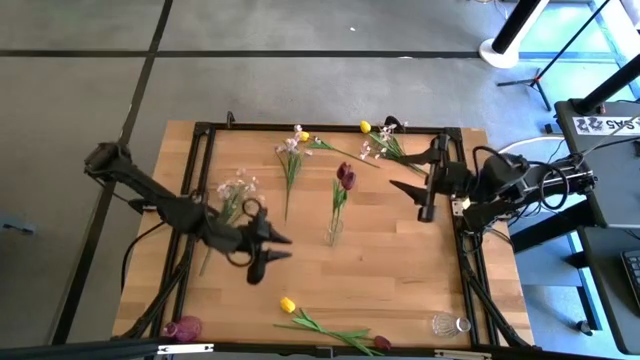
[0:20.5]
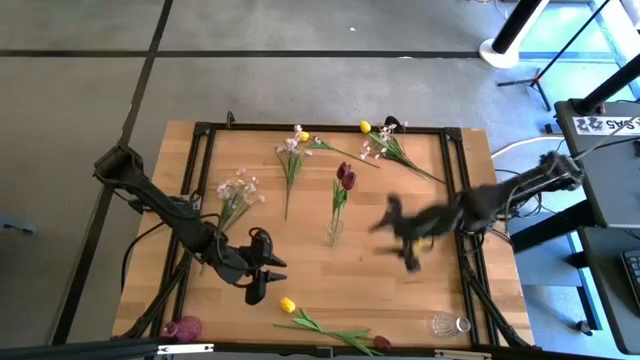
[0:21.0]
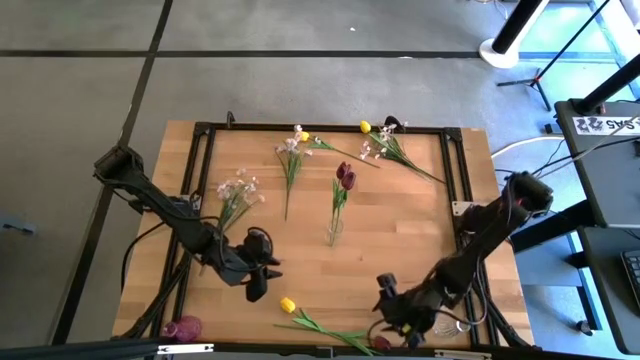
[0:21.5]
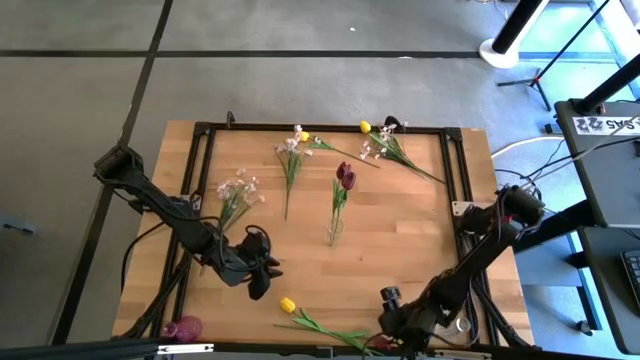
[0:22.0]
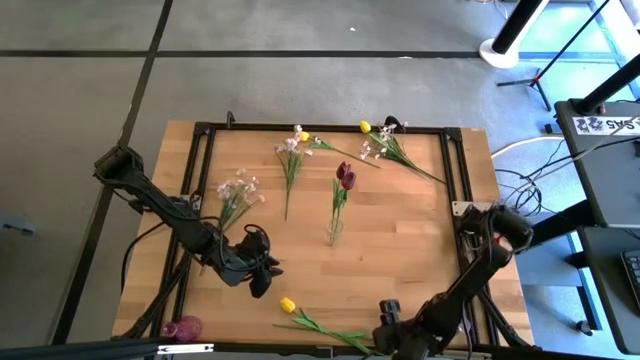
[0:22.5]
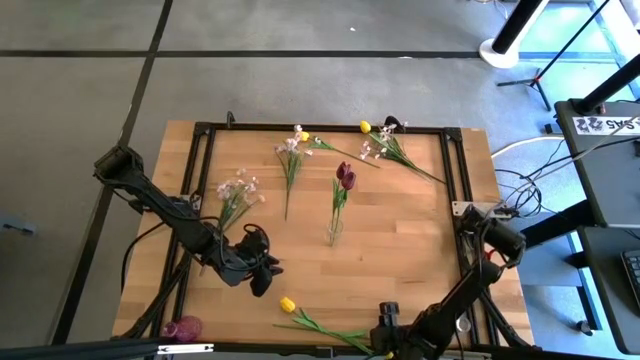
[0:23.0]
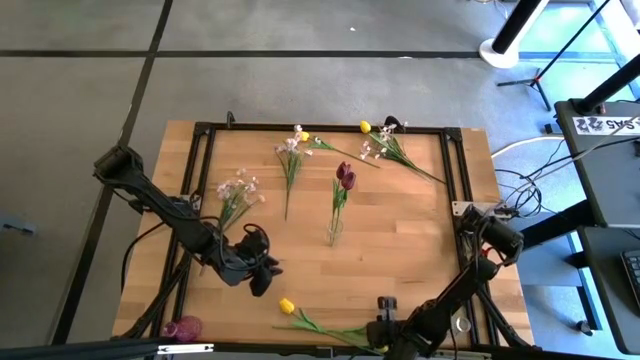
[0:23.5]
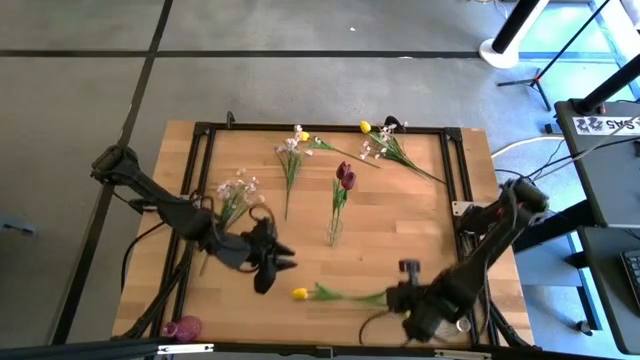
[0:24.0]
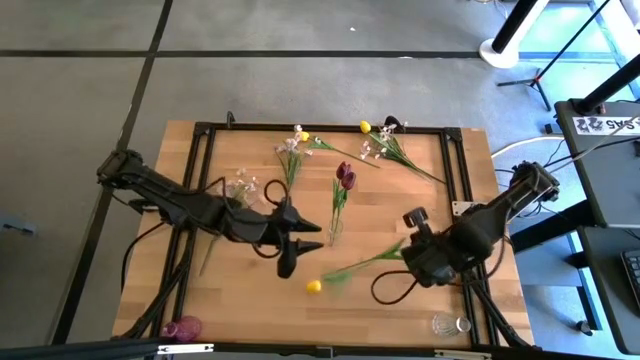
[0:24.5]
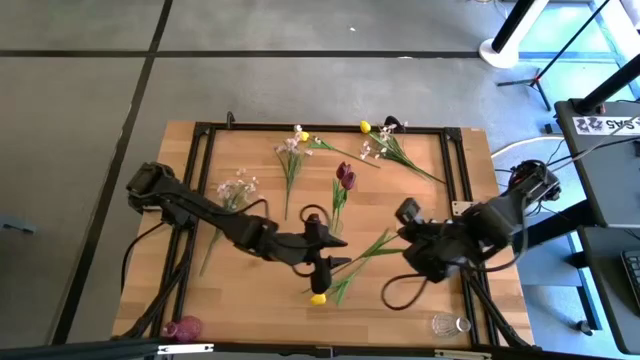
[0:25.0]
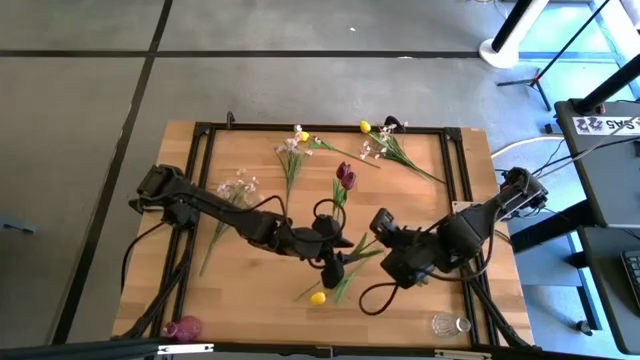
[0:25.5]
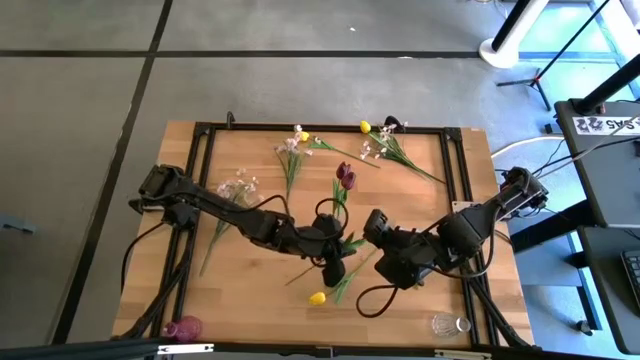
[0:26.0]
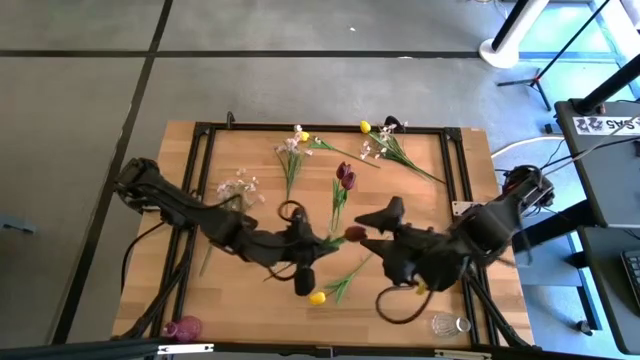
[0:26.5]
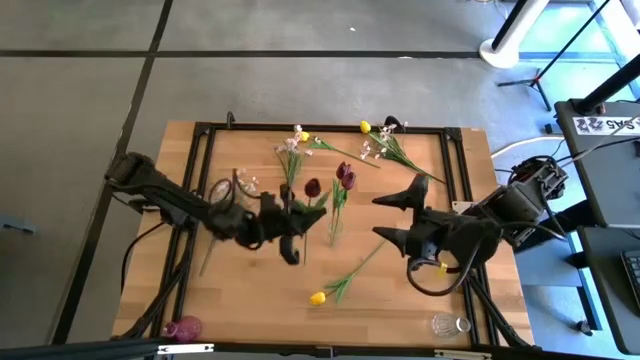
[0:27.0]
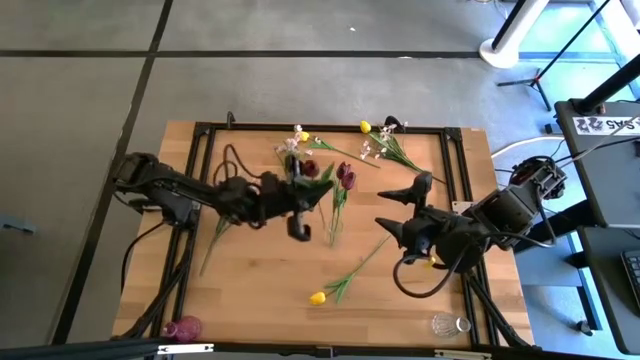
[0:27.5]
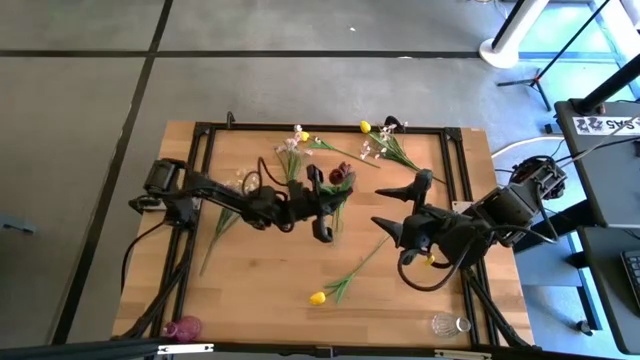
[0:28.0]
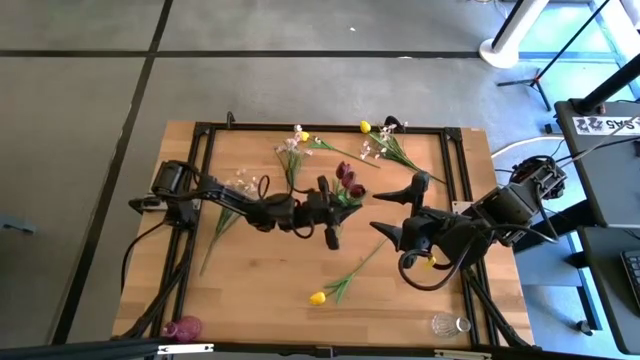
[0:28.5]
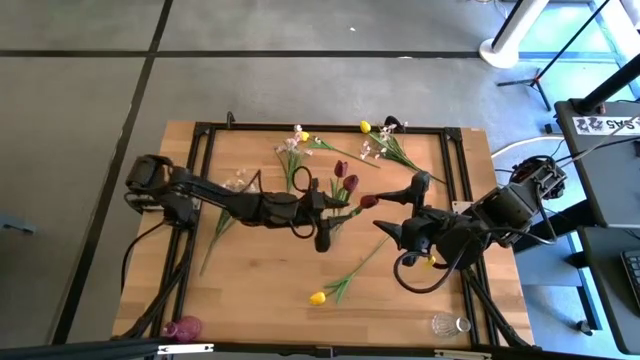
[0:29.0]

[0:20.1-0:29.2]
Task: Sort flowers into vase by color
Put the red tulip into the top transparent vase

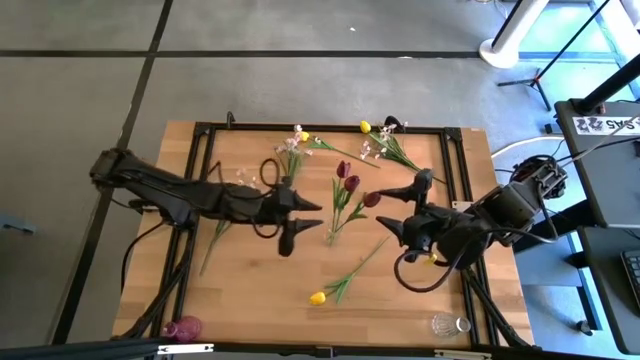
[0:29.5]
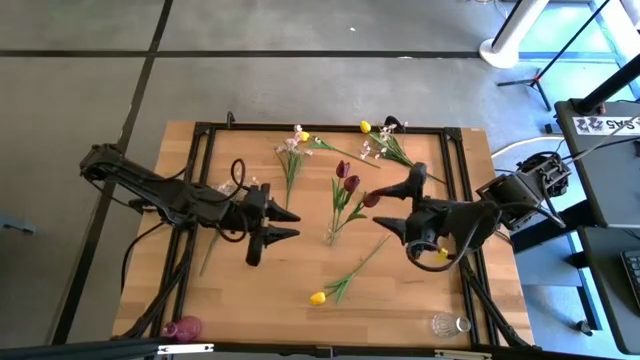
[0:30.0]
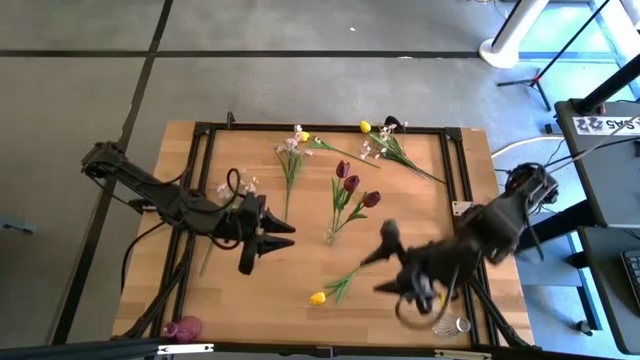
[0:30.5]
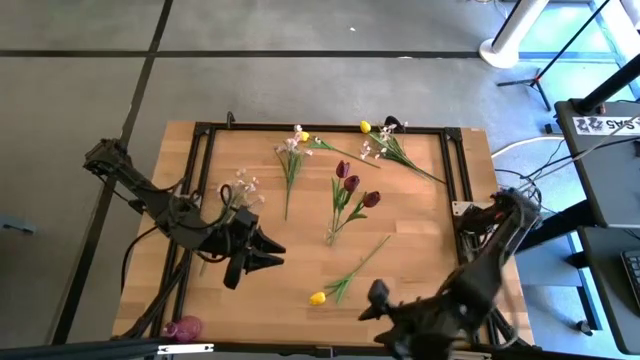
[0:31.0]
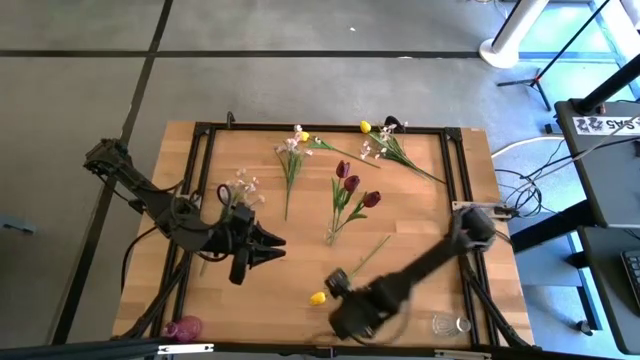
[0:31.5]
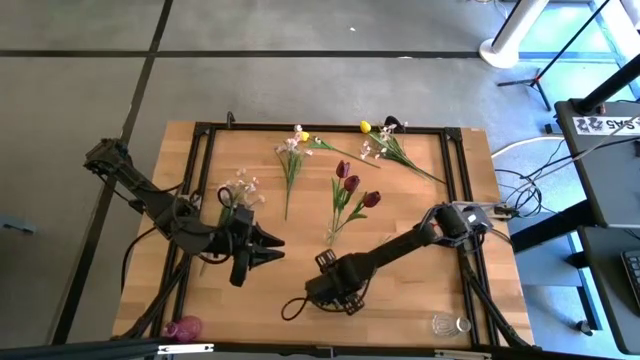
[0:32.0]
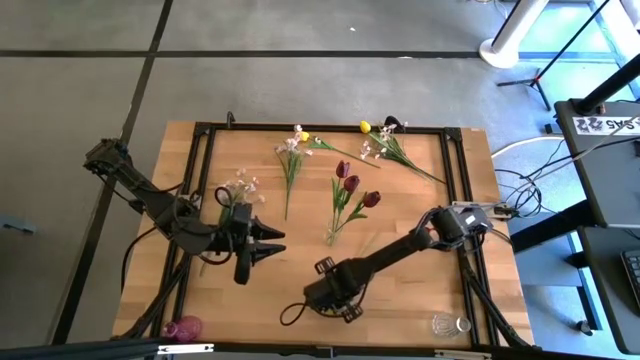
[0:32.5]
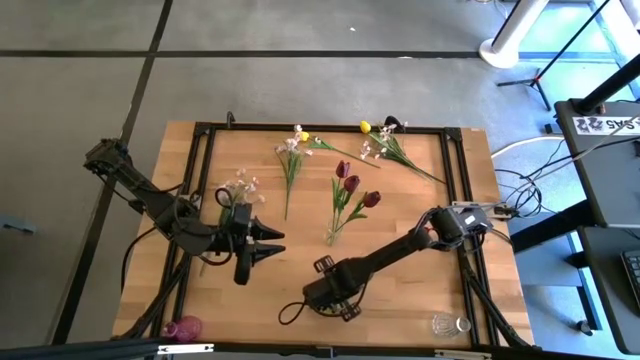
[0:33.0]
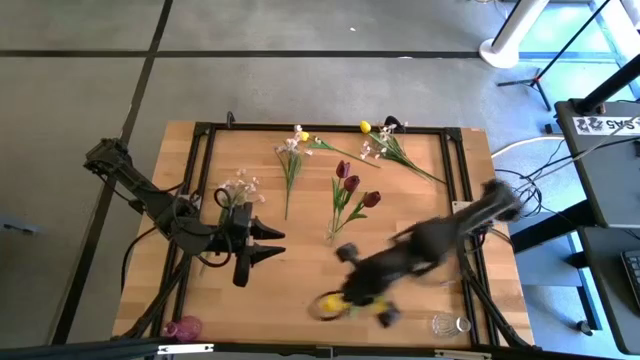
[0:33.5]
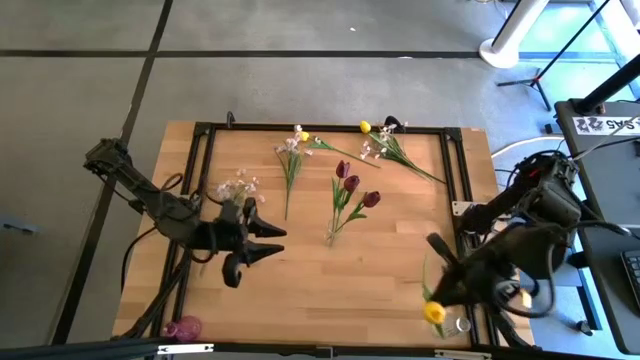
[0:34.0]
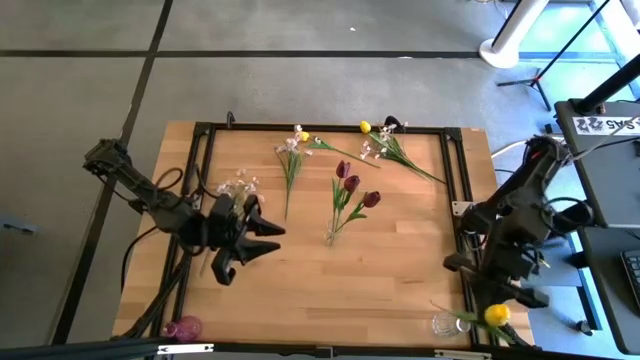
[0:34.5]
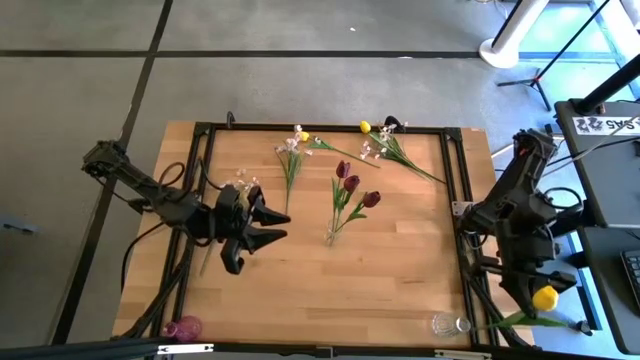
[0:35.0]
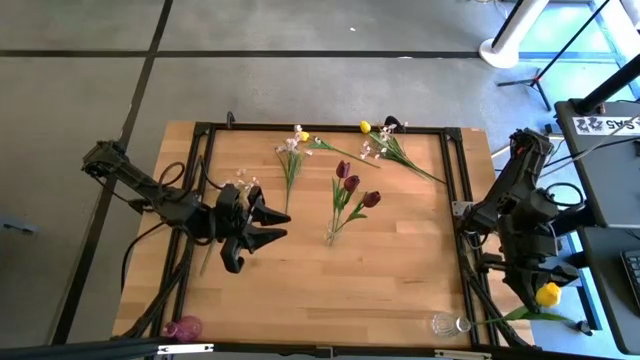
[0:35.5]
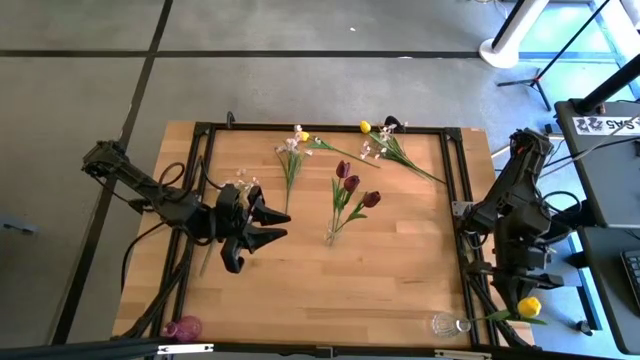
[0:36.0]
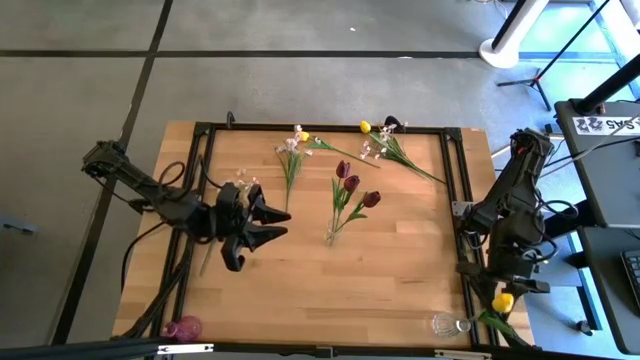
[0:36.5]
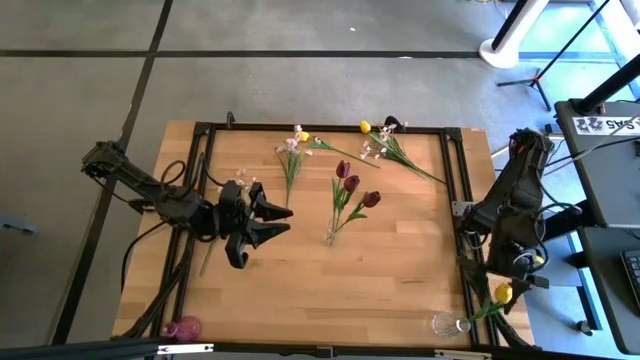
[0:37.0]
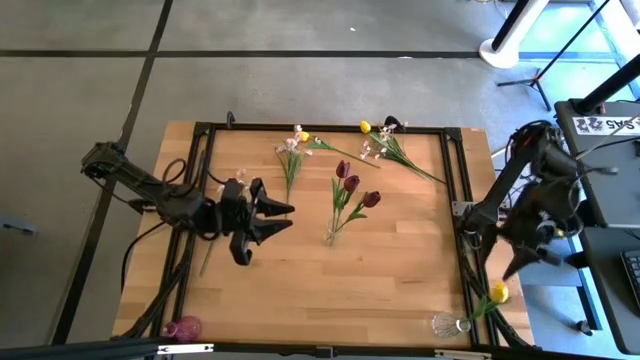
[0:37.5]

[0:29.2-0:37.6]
Put the bottom yellow tulip into the bottom transparent vase

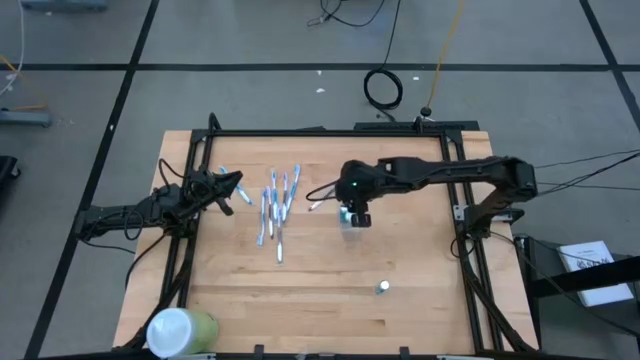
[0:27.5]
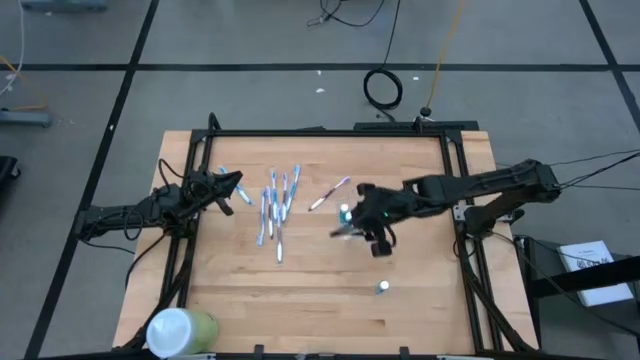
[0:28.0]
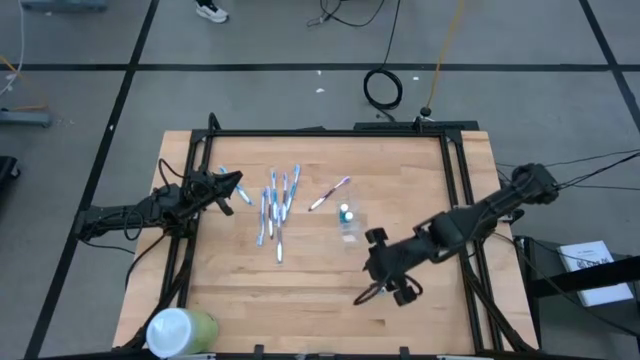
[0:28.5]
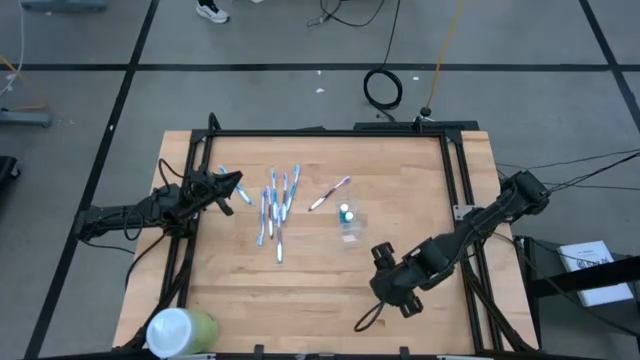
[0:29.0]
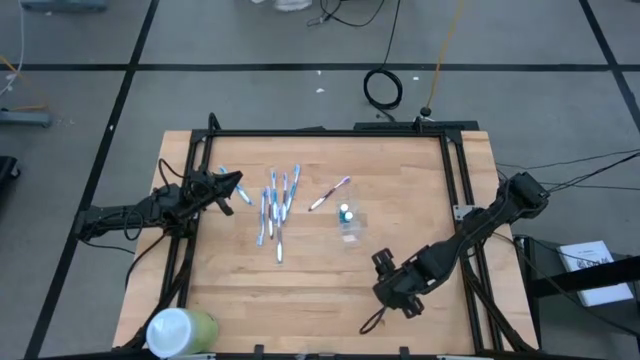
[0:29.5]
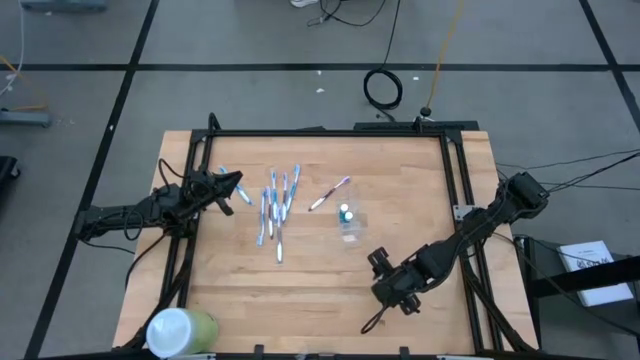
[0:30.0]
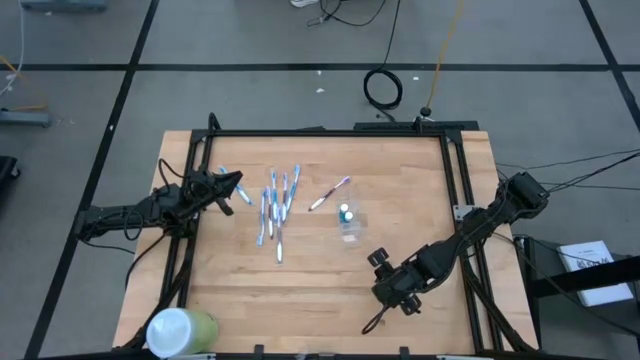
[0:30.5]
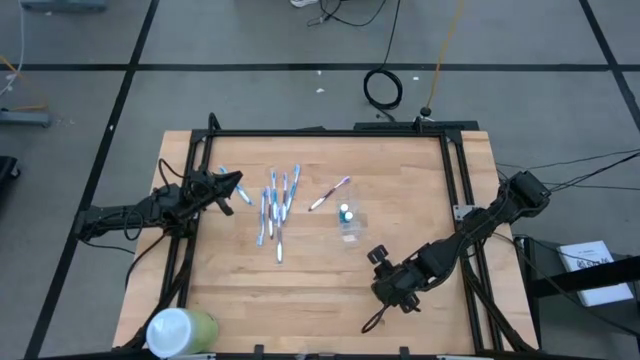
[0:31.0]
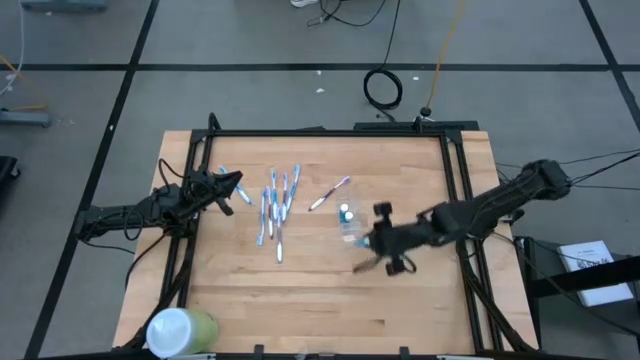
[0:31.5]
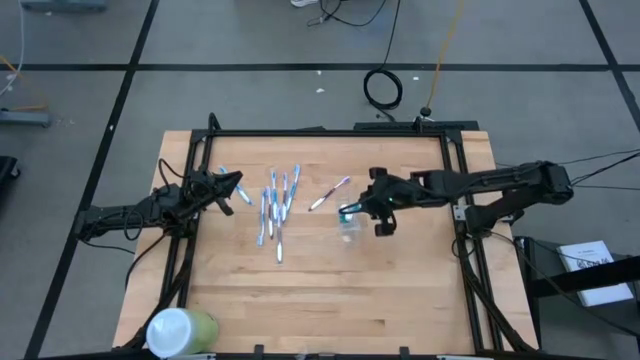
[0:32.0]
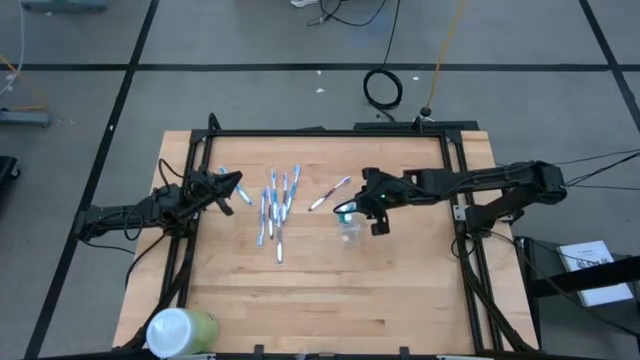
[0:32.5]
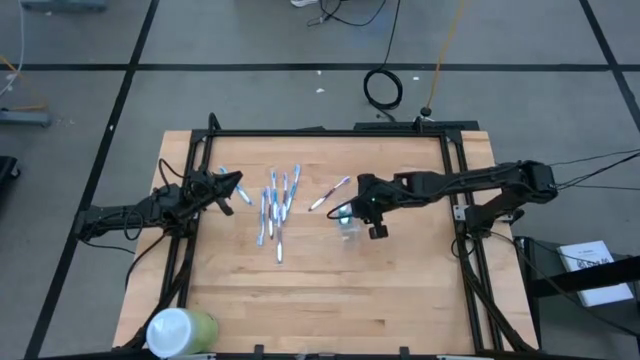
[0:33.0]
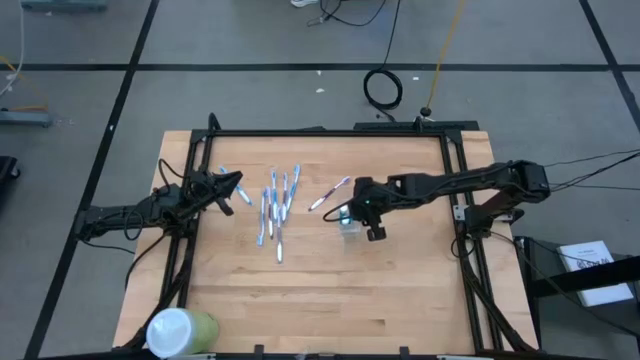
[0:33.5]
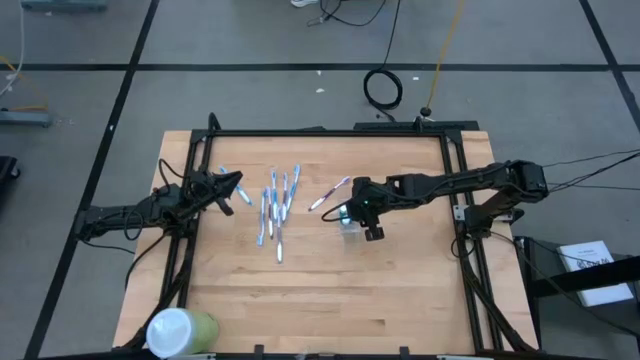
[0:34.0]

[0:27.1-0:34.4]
Task: Pick & Place toothbrushing station
Put the blue mouthwash into the transparent organizer
